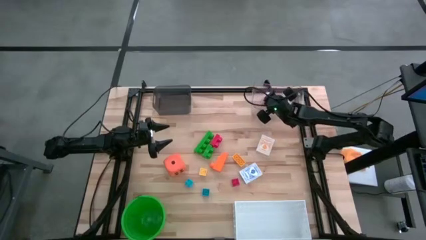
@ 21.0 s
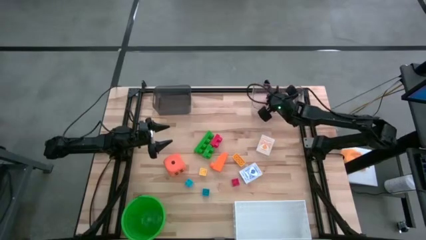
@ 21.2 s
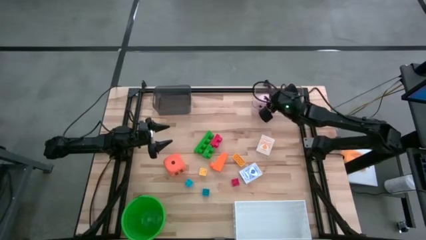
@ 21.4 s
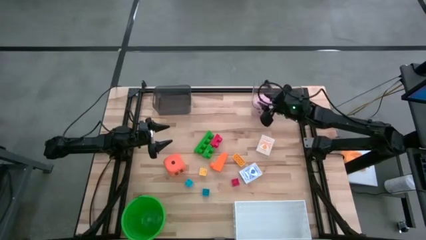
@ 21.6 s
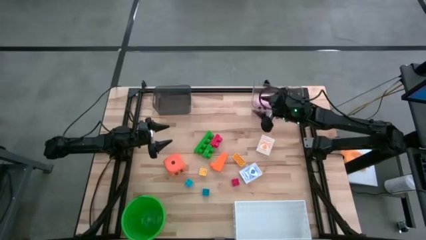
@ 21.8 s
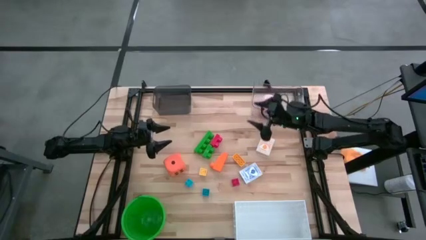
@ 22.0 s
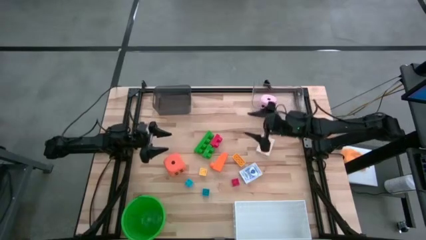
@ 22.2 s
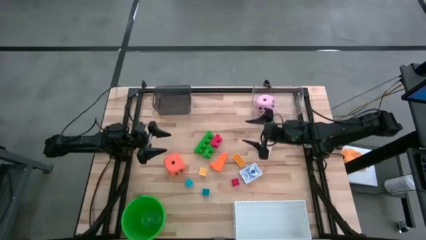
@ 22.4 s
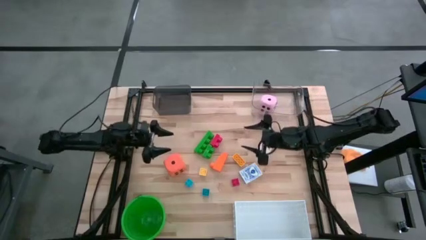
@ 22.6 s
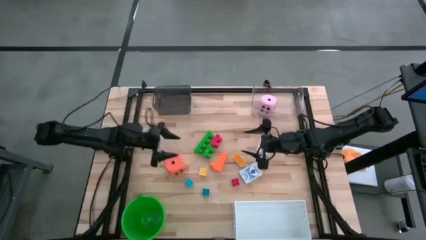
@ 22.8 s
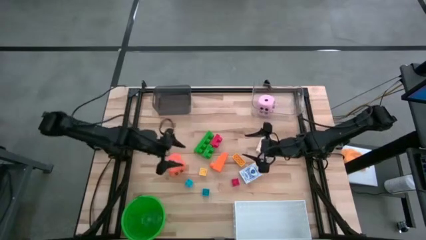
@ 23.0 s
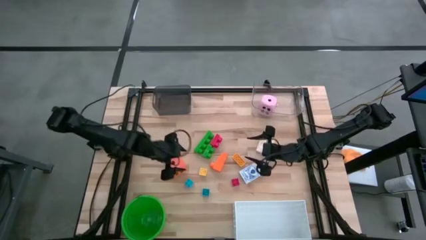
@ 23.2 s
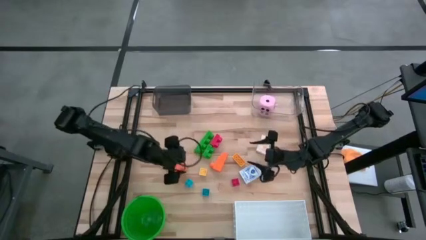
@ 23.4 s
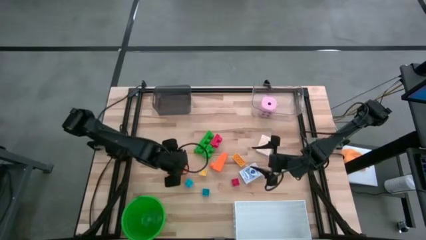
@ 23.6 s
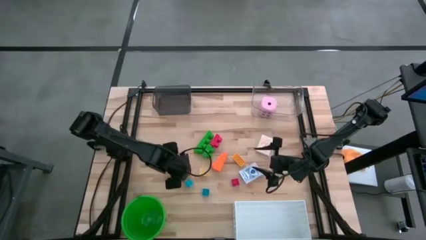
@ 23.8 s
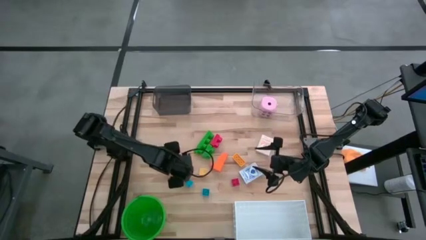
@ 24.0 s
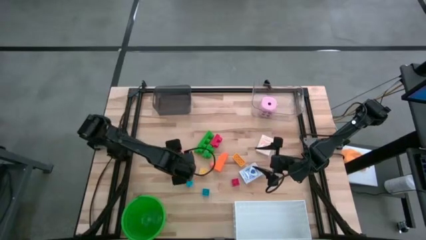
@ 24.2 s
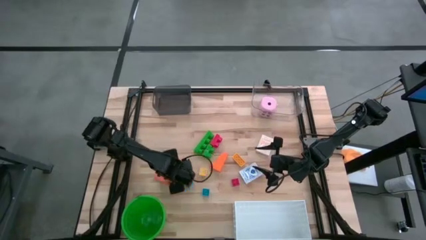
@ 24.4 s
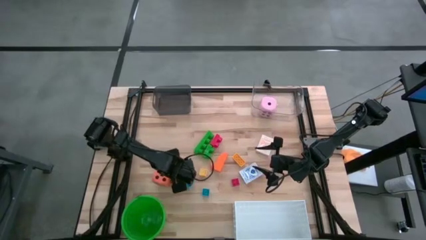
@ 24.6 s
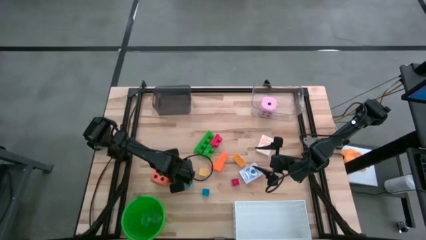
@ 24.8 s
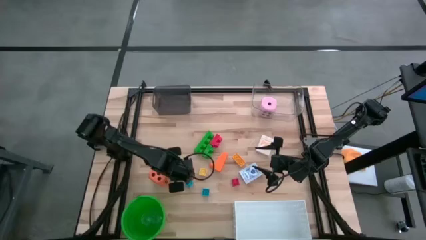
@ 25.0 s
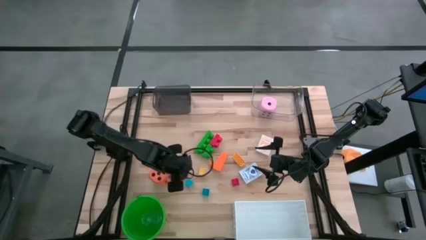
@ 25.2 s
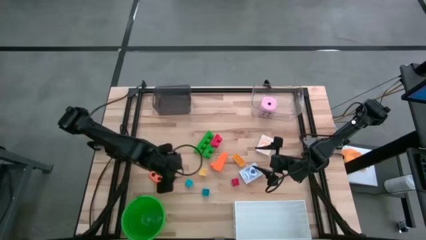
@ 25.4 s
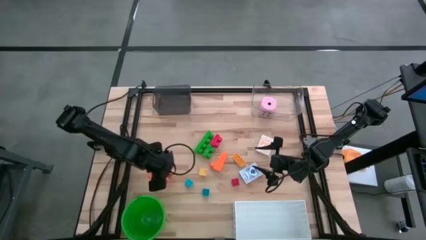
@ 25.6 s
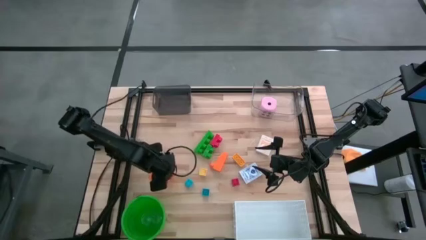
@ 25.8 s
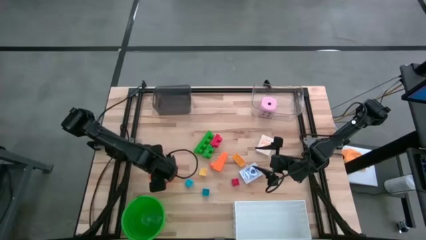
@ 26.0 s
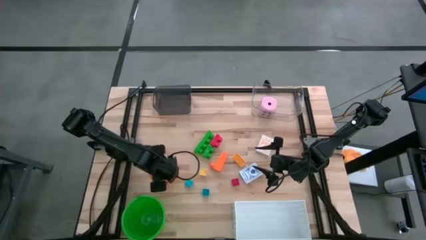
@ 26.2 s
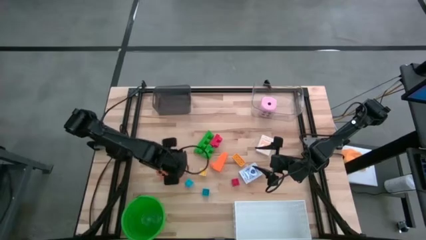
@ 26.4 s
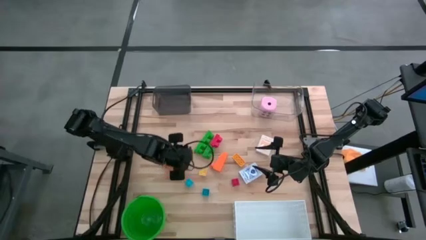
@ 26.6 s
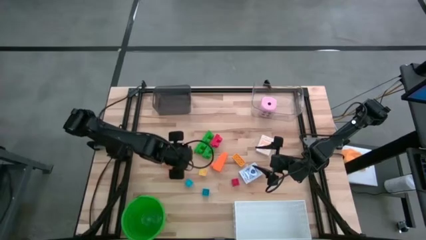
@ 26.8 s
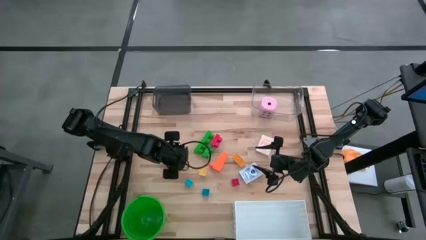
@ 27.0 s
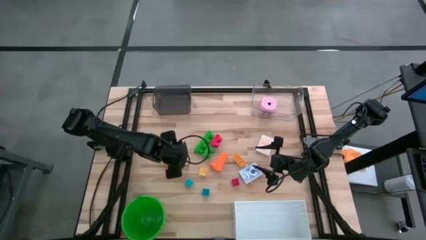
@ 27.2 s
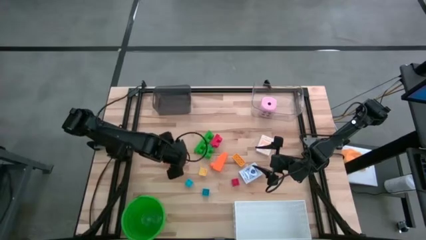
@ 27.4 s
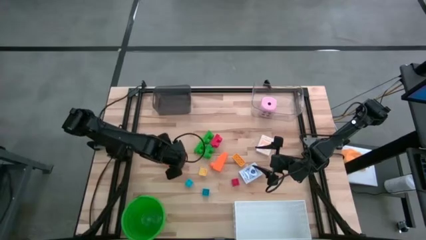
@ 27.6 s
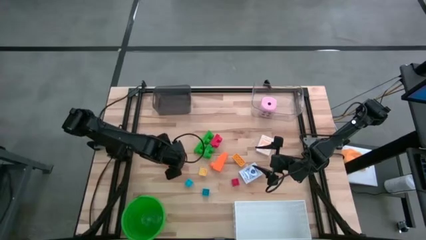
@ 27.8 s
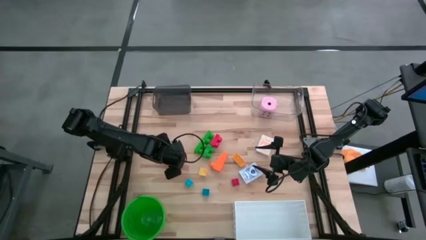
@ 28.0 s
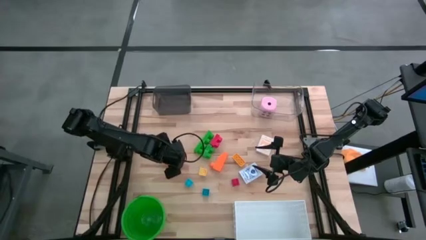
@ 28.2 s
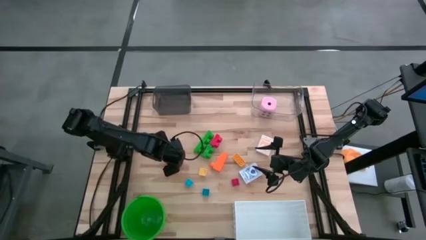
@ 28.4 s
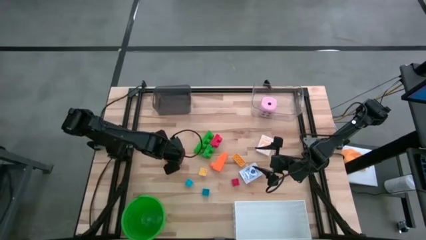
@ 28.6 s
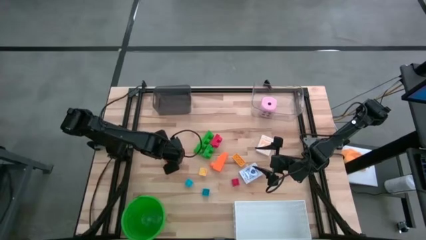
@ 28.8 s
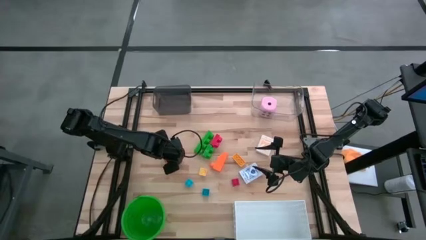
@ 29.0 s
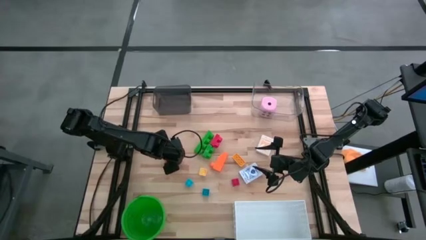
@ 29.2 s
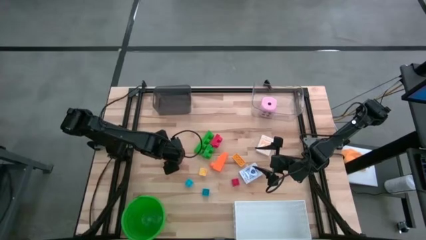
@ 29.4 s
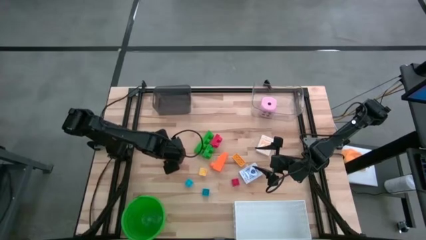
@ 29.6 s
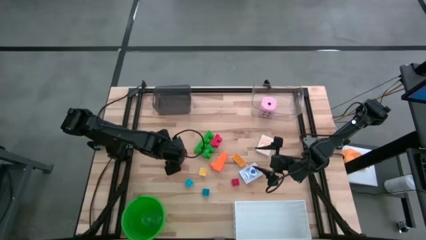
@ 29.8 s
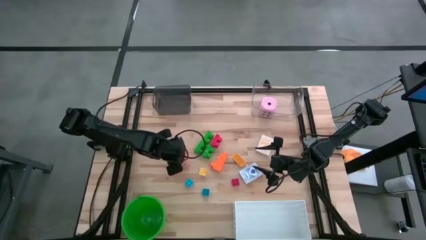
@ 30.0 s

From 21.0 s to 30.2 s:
Task: Pick & Place Toys
Put the orange dice into the transparent bin

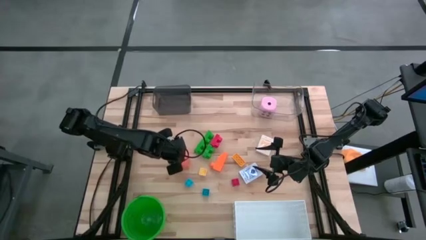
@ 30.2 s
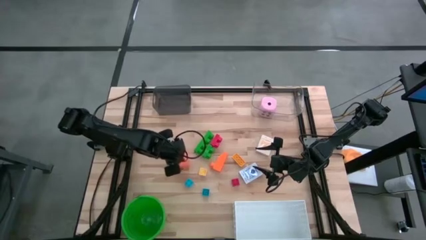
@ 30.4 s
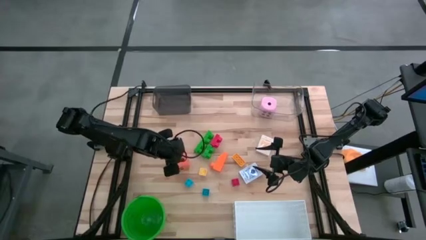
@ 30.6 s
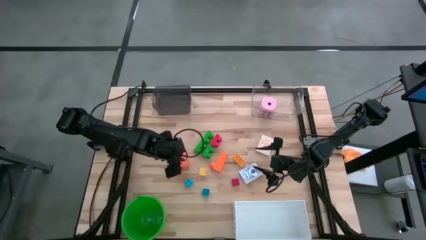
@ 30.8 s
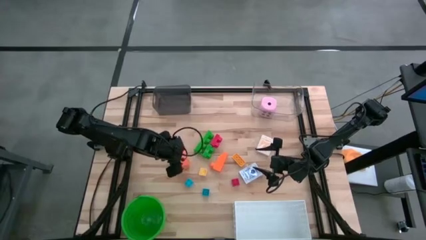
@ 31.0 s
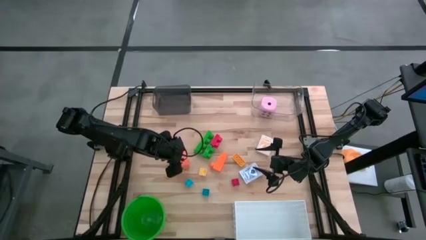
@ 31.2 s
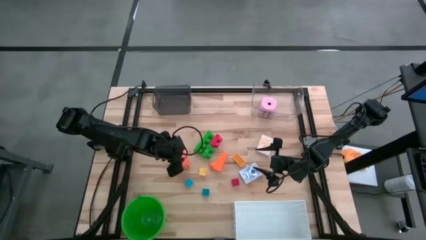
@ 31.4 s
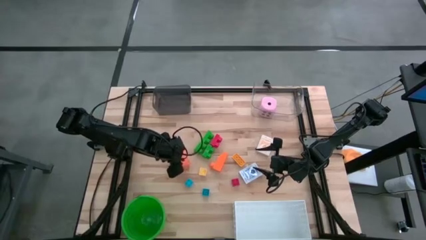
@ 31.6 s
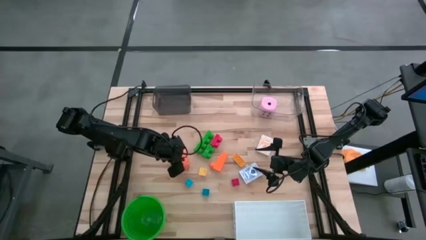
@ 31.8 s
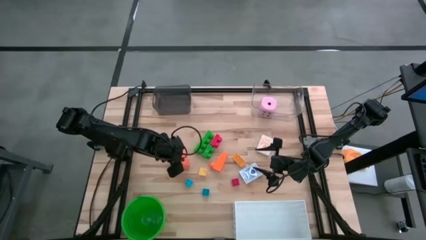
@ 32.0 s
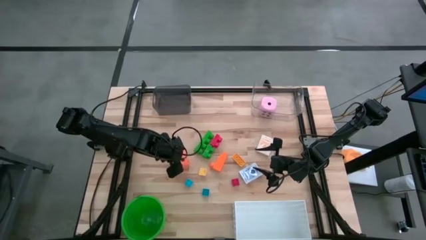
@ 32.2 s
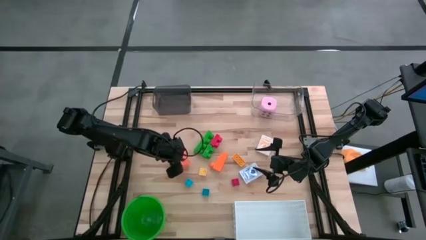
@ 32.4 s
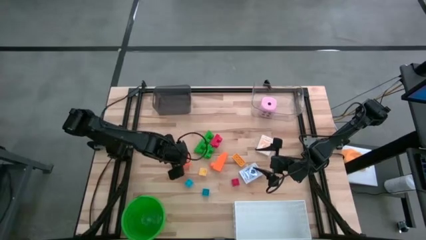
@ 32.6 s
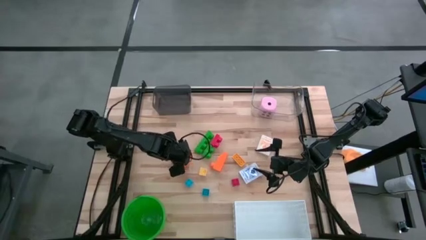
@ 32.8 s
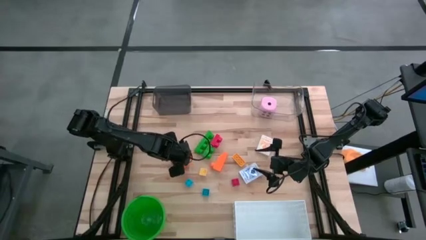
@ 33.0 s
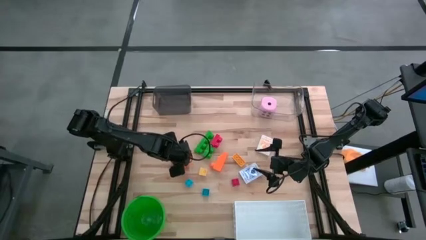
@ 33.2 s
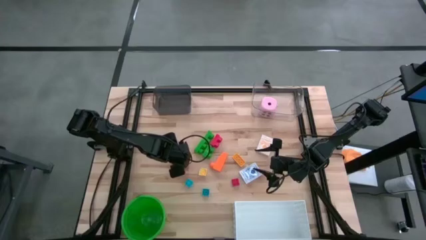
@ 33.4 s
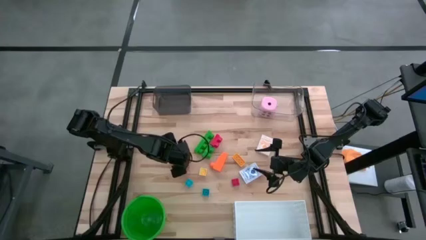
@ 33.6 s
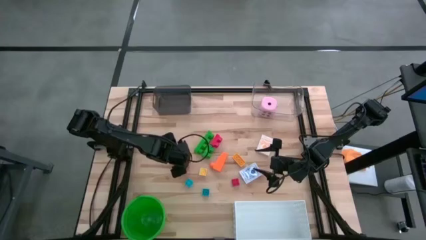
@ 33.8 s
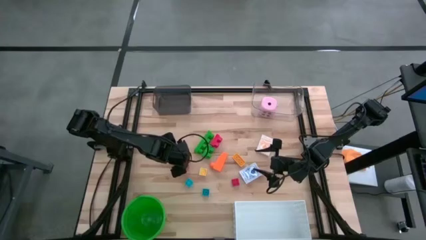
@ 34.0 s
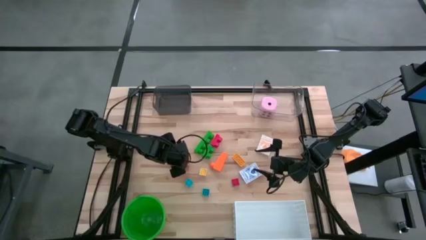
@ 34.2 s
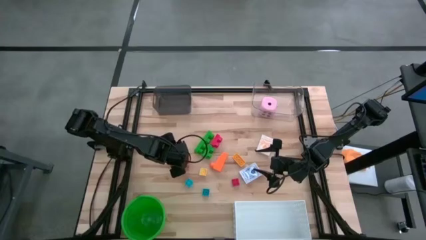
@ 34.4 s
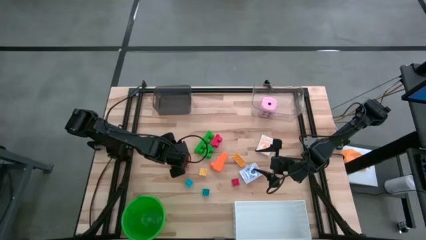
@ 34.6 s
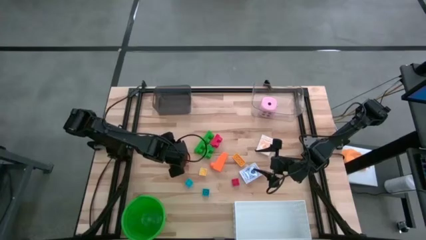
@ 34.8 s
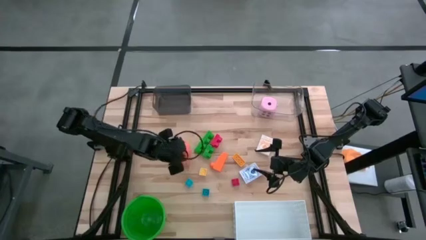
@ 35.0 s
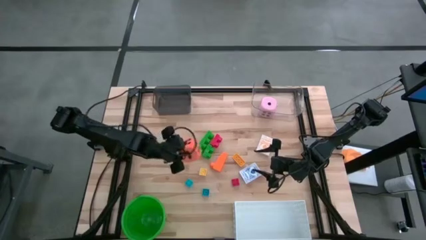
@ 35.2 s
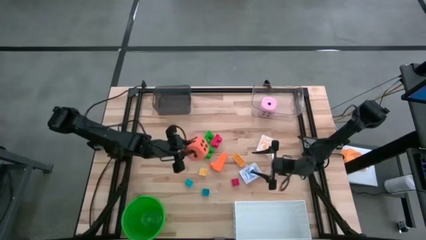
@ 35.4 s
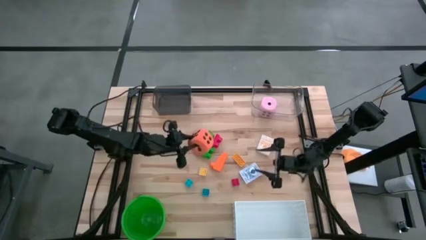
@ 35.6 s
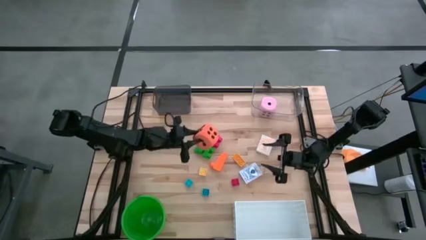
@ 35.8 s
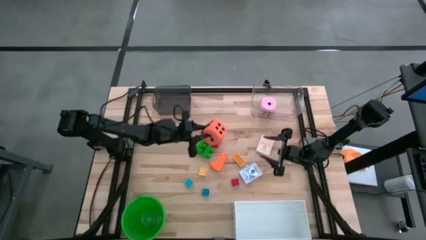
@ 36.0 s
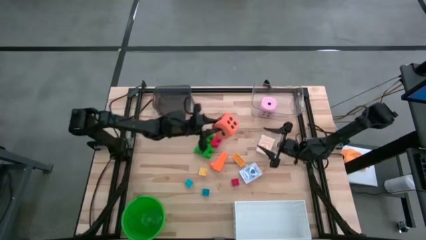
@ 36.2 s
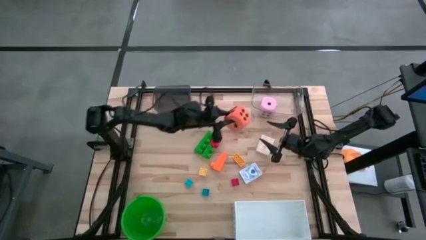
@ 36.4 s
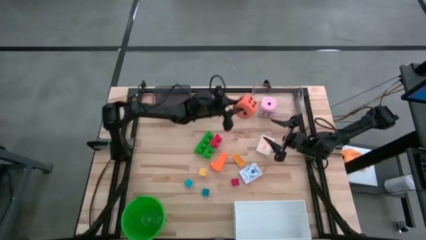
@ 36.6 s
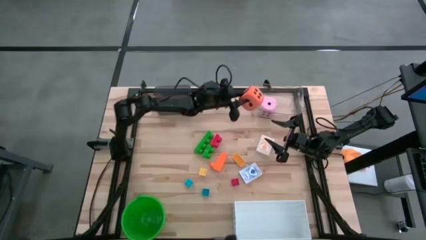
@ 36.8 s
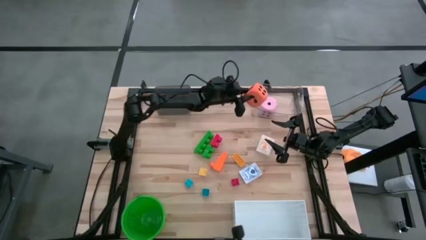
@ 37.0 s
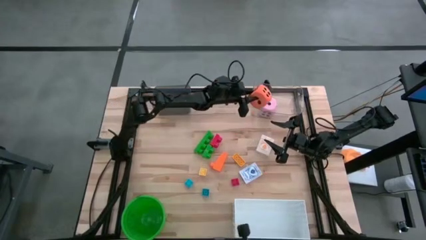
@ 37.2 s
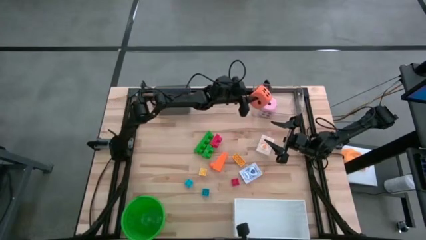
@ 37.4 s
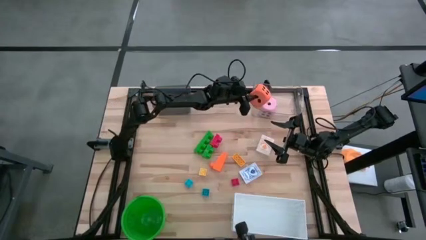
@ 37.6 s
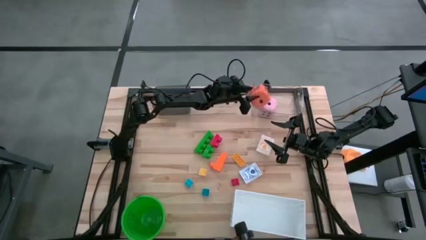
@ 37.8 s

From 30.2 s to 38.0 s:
Put the orange dice into the transparent bin
